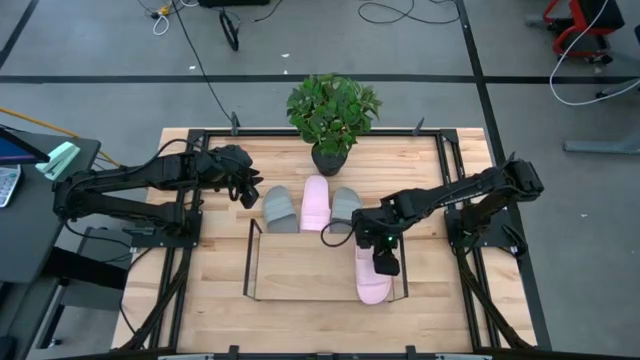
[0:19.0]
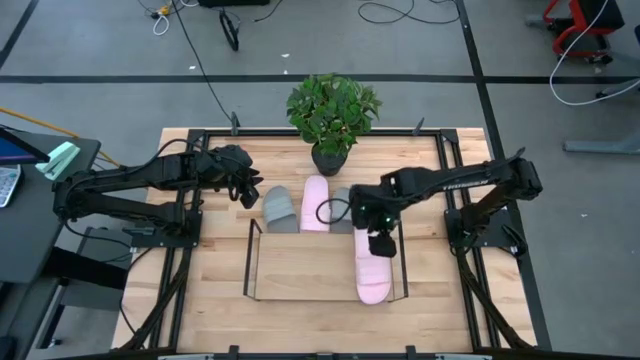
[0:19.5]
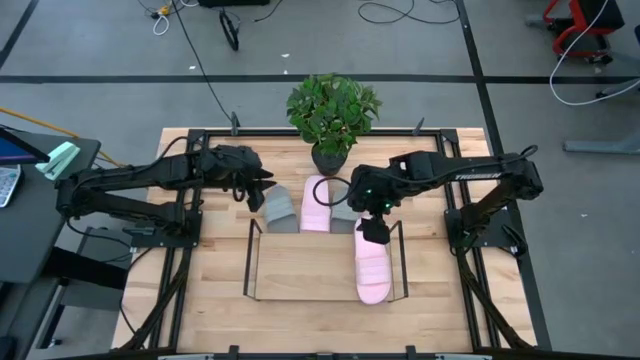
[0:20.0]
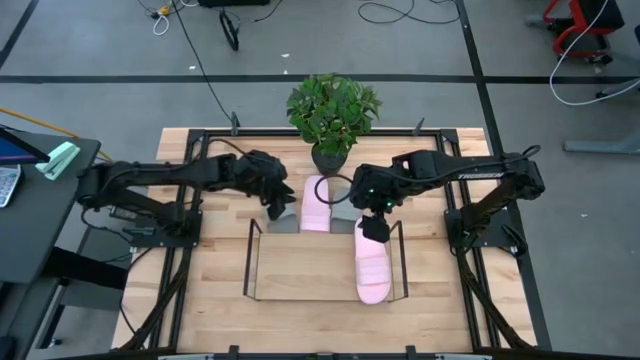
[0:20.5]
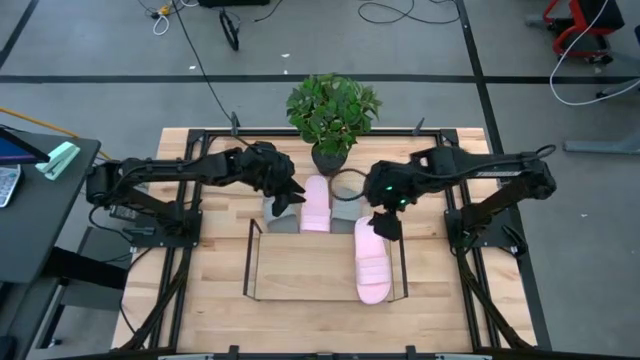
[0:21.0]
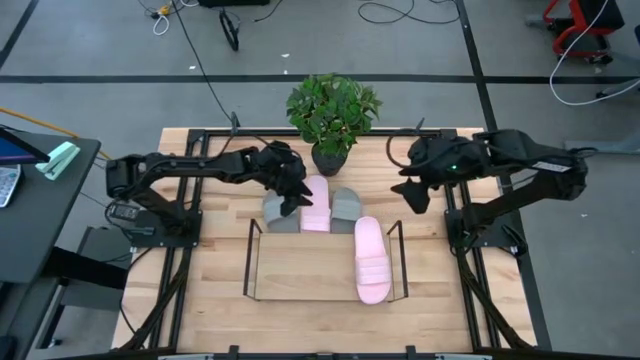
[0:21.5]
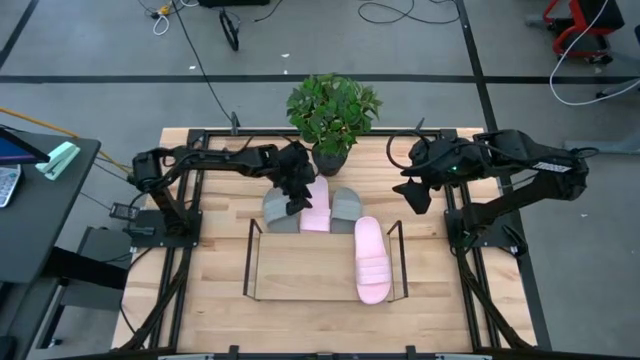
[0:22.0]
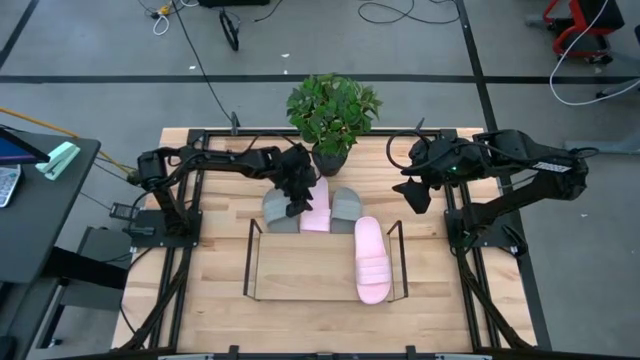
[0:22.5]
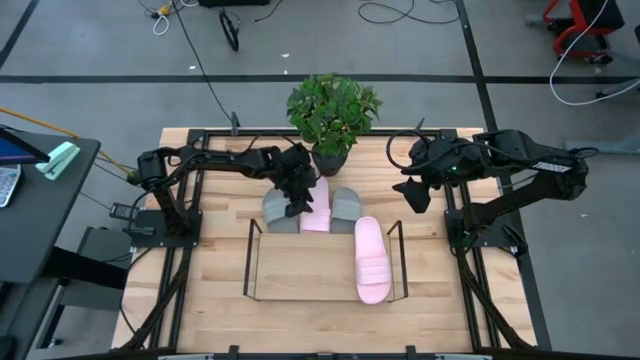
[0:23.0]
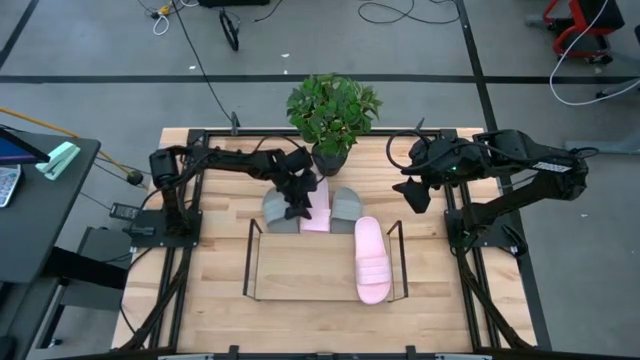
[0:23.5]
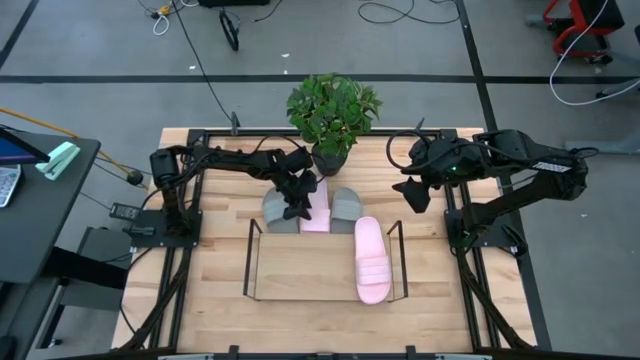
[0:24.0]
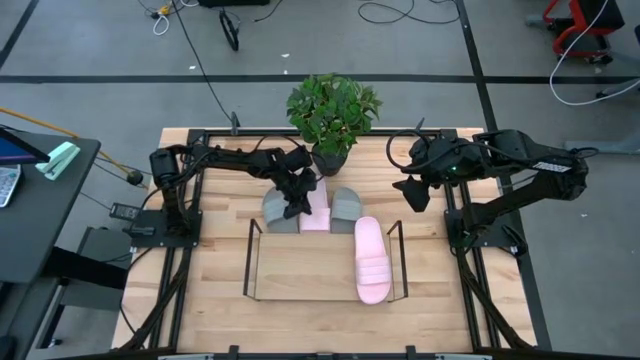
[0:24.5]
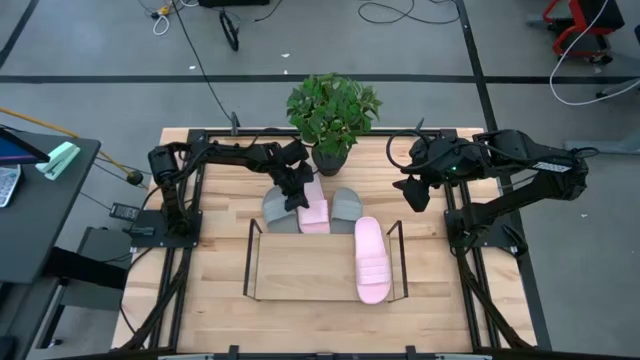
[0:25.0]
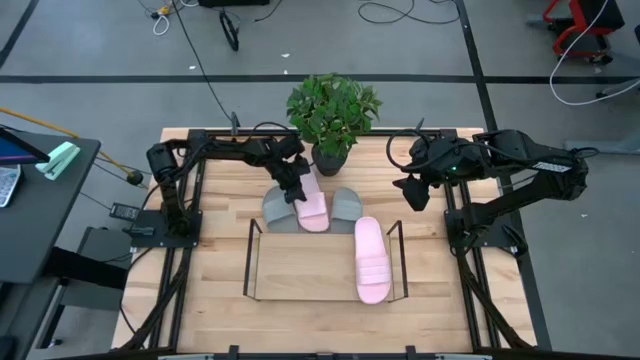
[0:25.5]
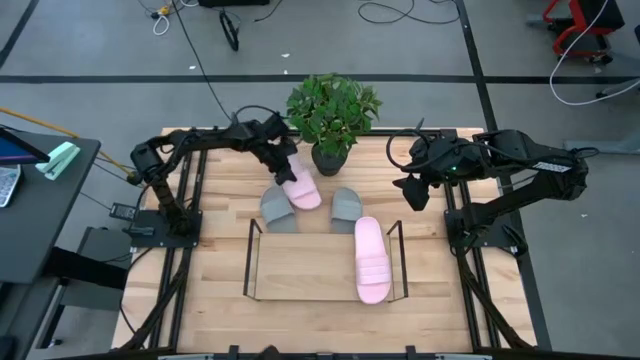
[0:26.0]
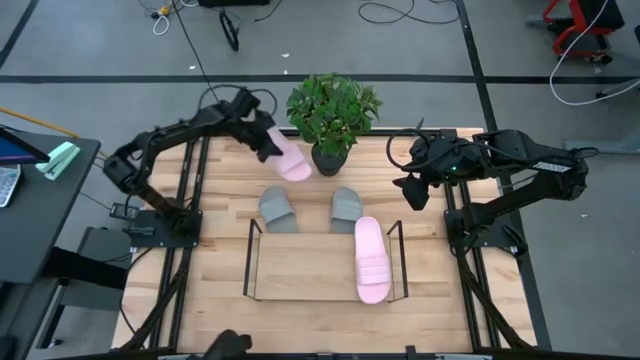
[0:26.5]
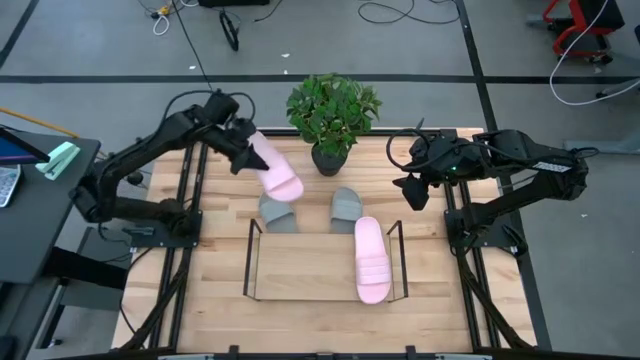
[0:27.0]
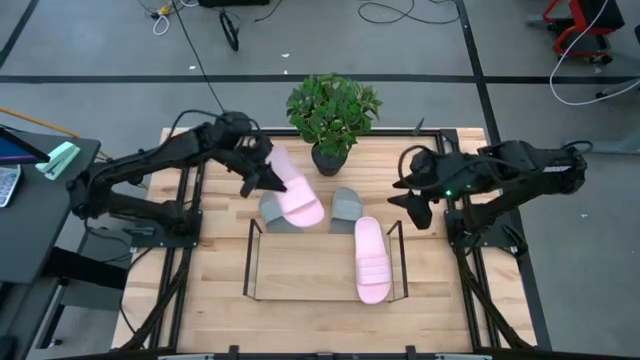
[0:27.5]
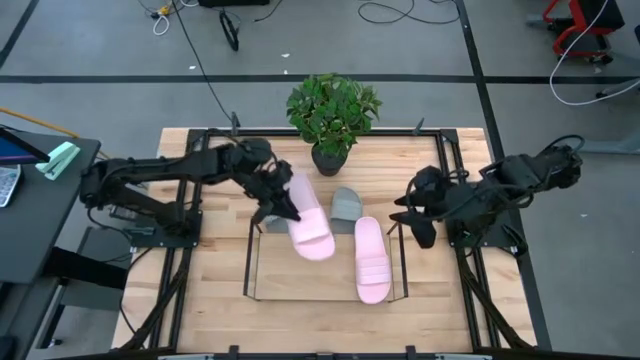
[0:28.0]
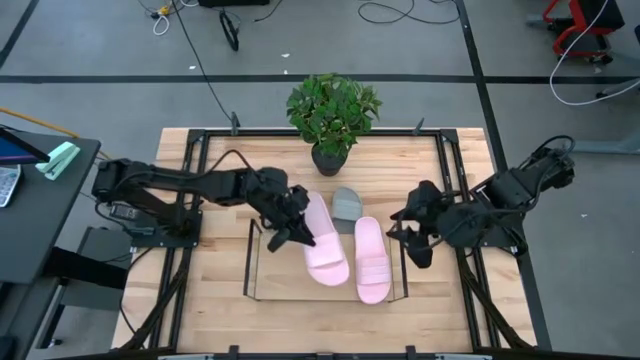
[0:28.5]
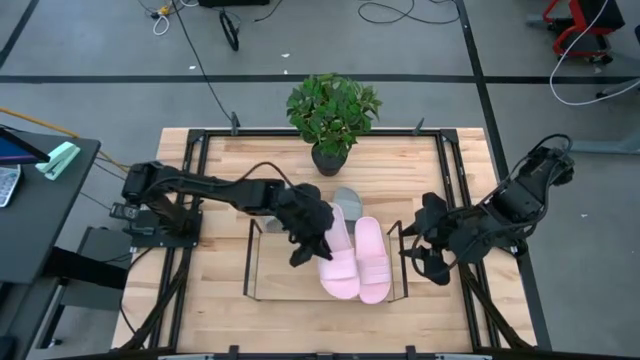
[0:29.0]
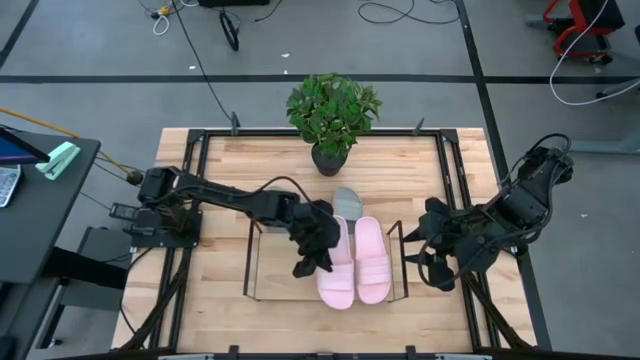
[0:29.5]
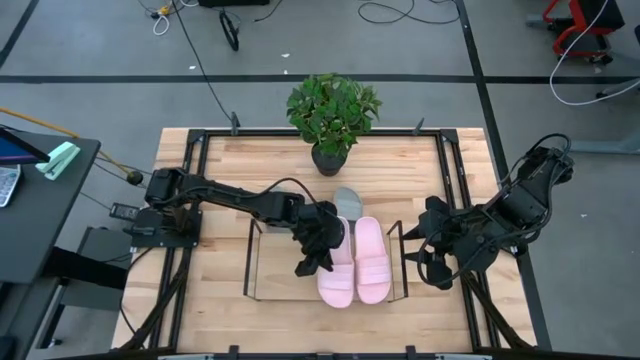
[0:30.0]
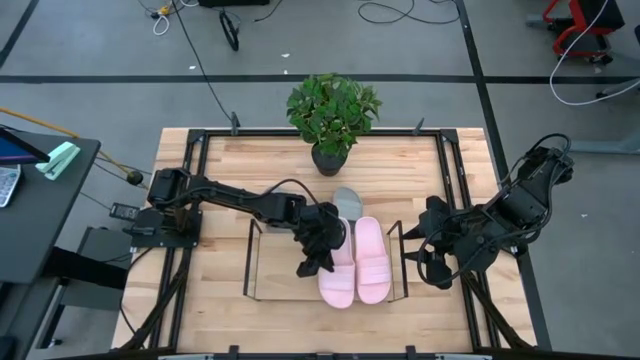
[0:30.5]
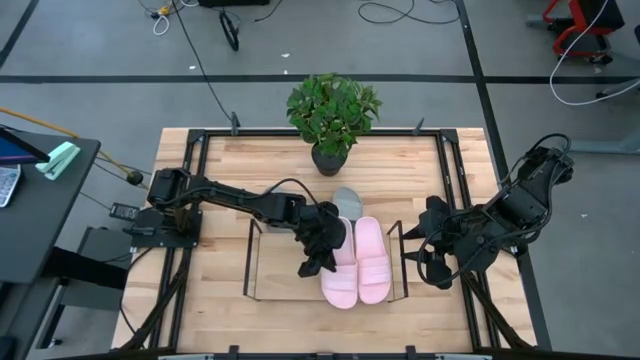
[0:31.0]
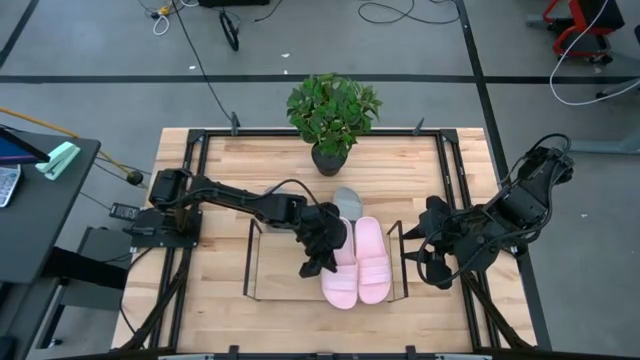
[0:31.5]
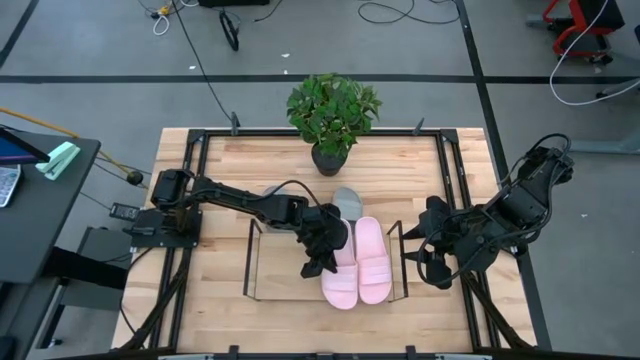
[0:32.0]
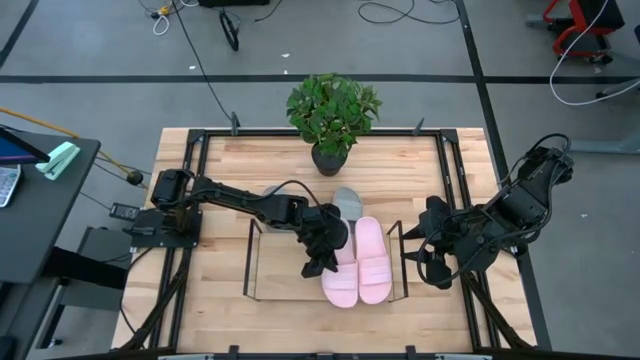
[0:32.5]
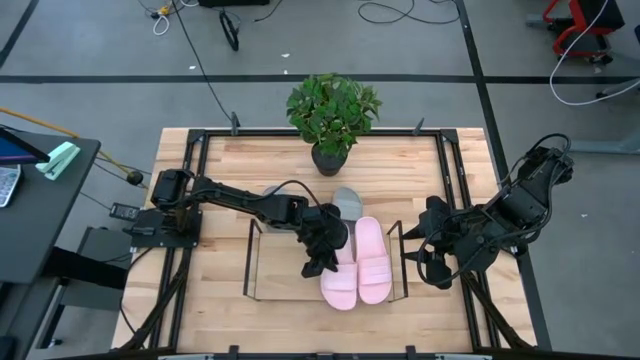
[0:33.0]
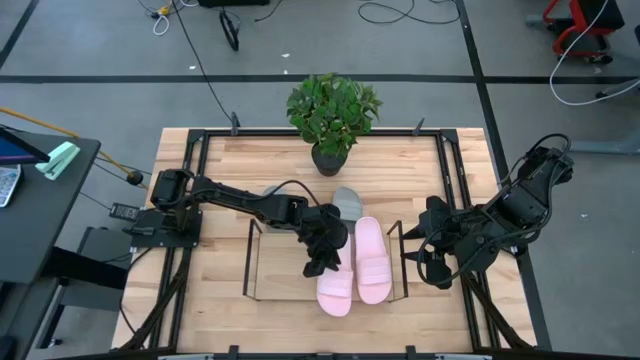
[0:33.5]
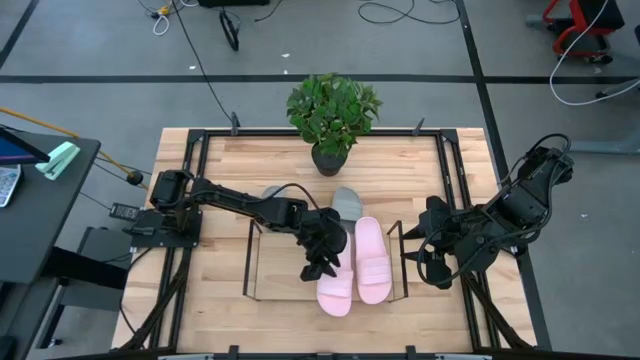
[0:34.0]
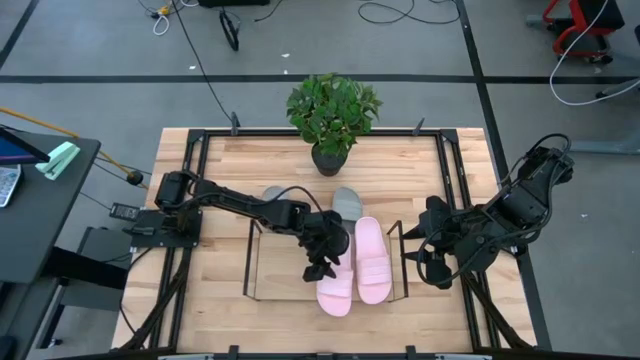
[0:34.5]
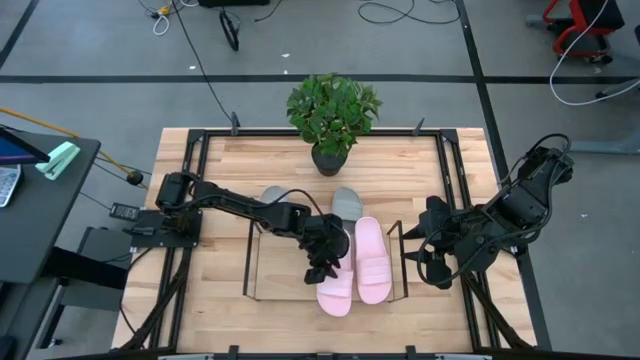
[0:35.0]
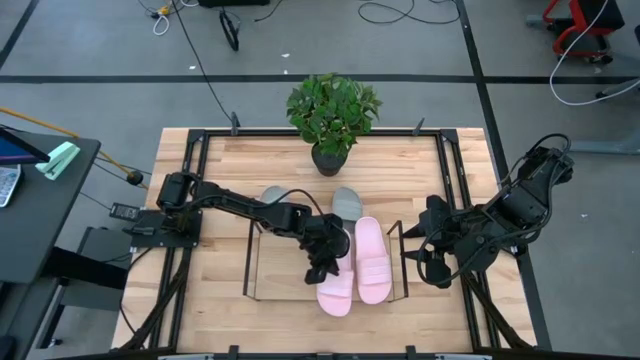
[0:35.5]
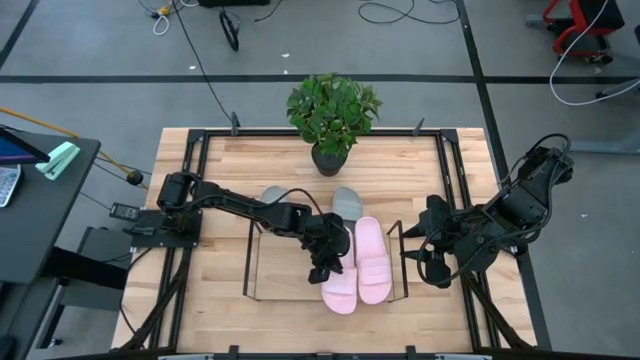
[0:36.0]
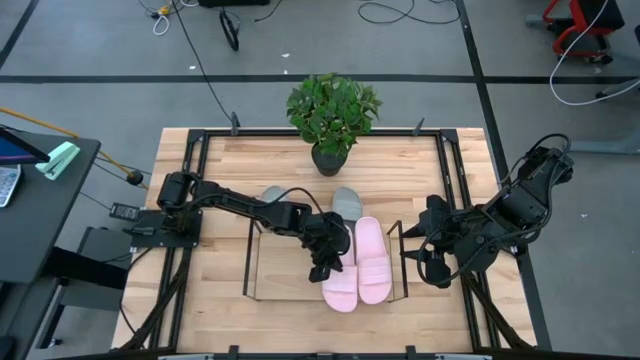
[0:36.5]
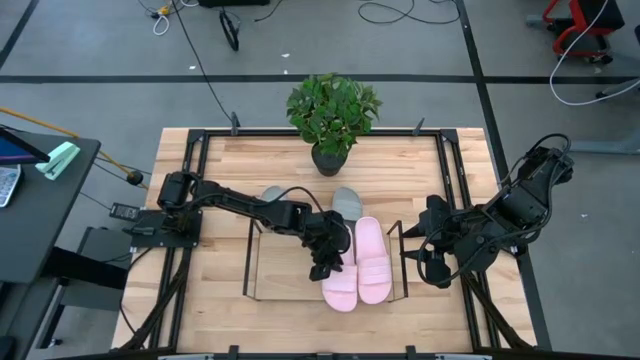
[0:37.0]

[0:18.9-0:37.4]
Task: Pick and place slides into the shelf
Put the pink slipper on the shelf

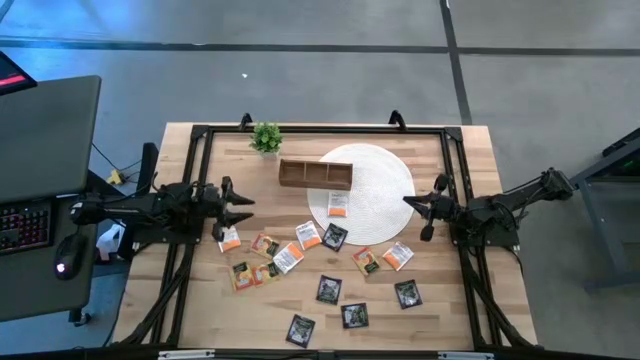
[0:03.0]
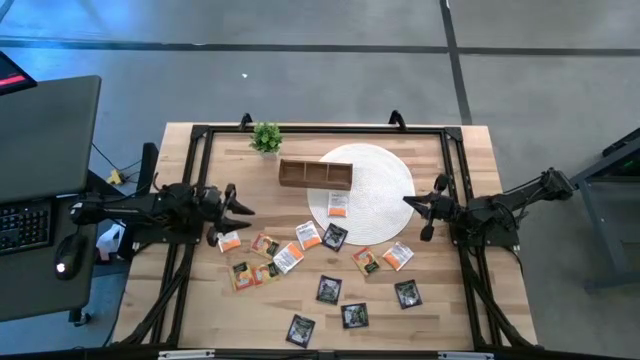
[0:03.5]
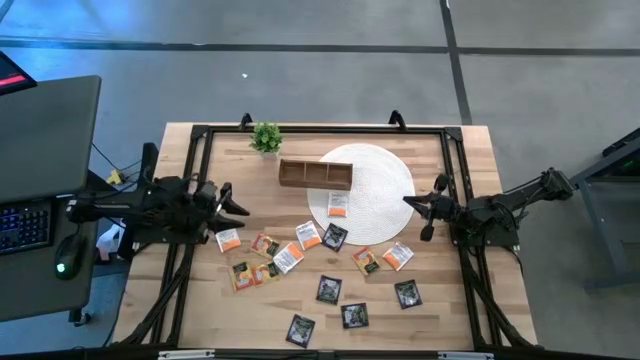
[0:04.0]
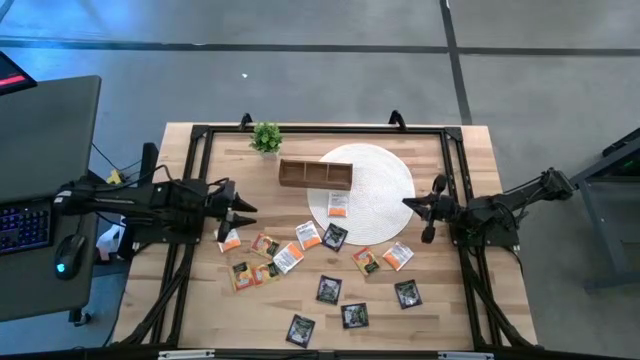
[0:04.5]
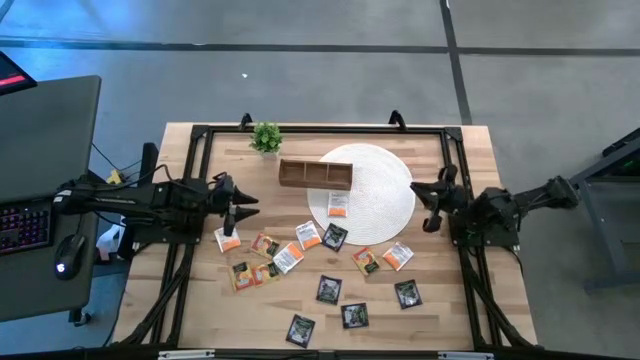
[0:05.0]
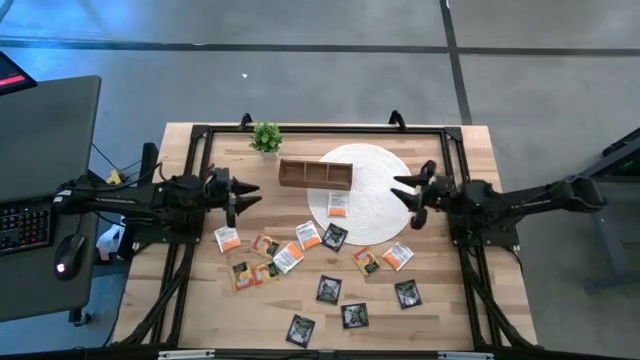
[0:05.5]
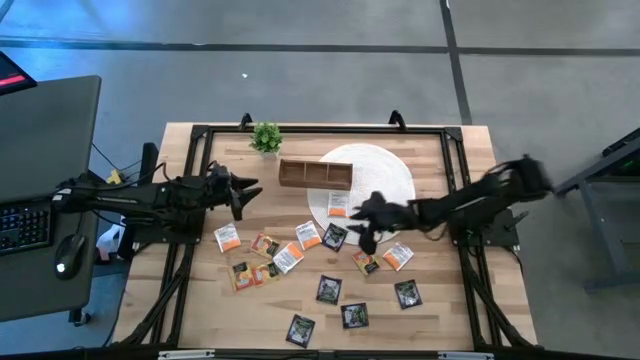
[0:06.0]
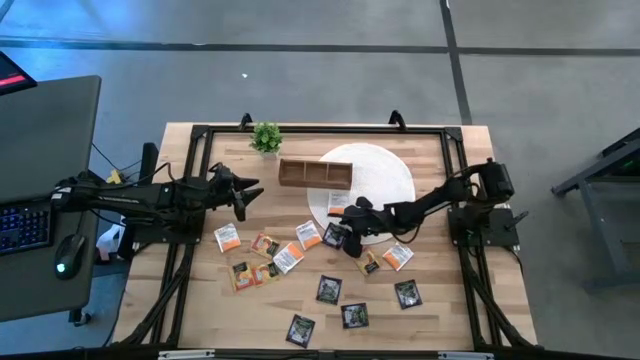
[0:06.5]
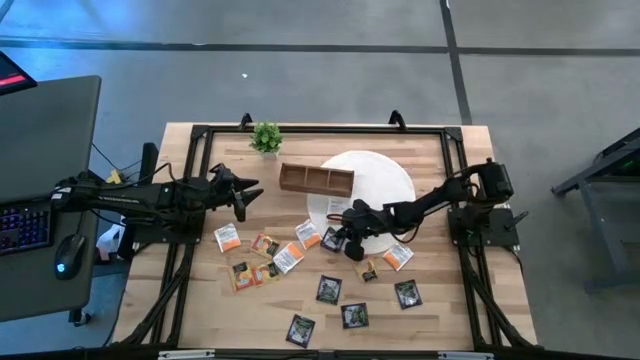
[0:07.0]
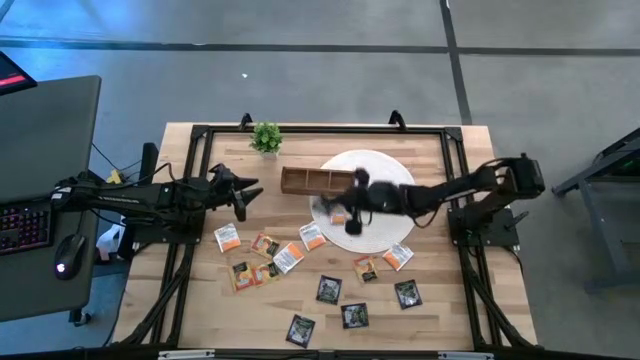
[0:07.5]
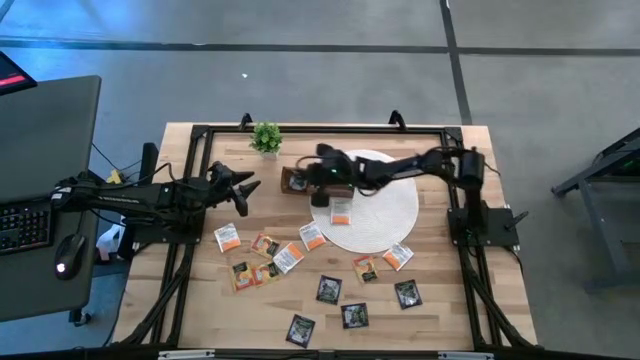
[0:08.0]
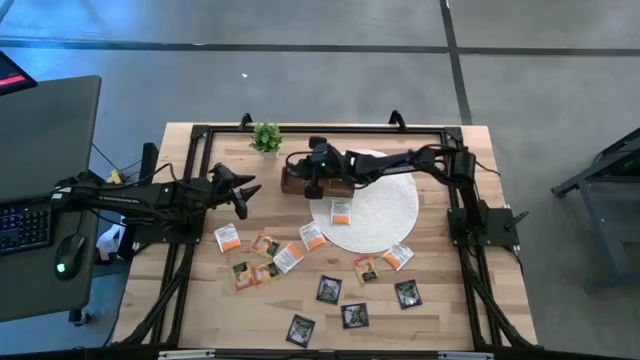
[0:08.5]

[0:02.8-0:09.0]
Task: Pick & Place Tea
Put the violet tea bag into the left section of the wooden organizer
